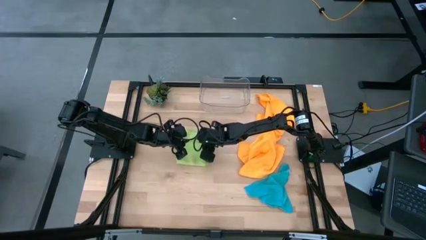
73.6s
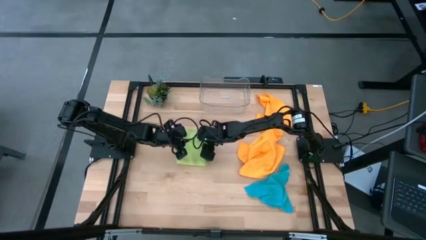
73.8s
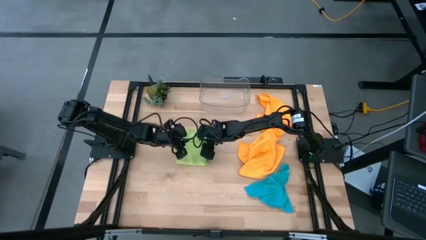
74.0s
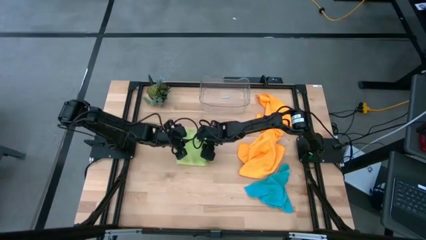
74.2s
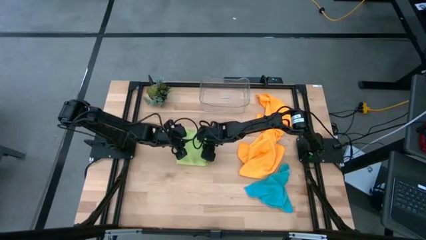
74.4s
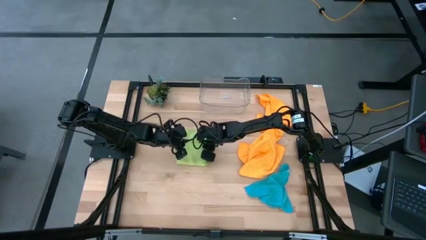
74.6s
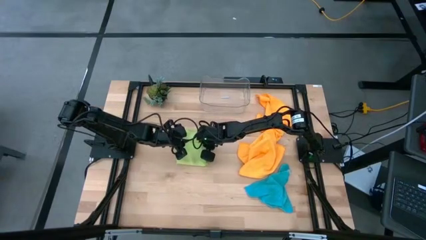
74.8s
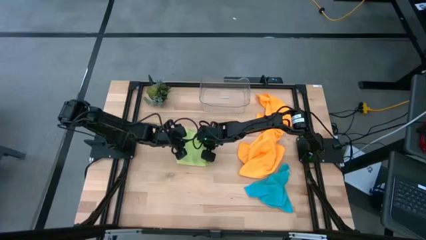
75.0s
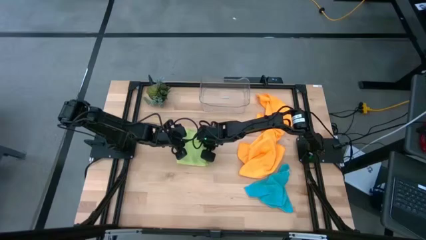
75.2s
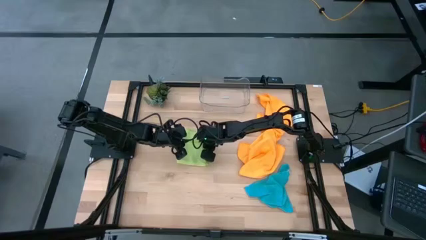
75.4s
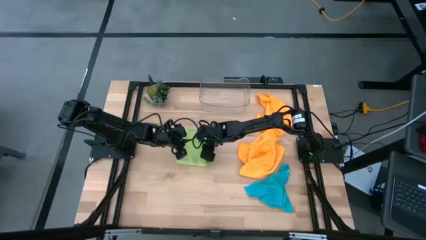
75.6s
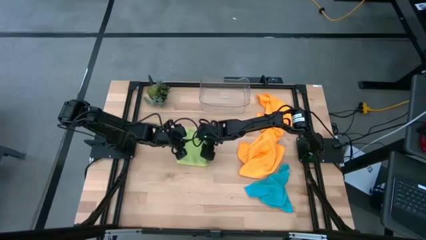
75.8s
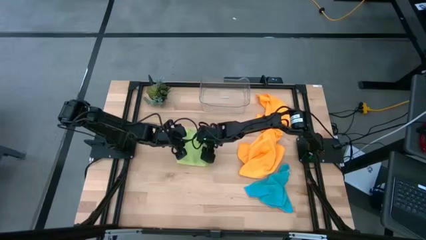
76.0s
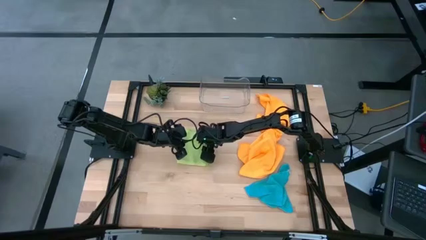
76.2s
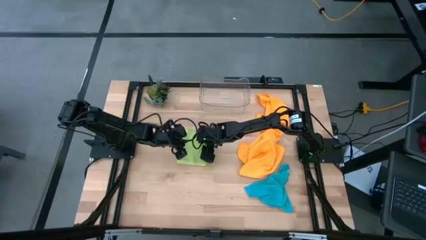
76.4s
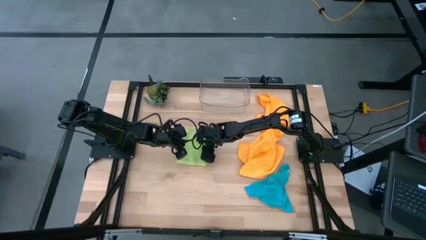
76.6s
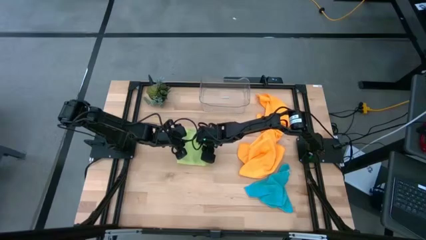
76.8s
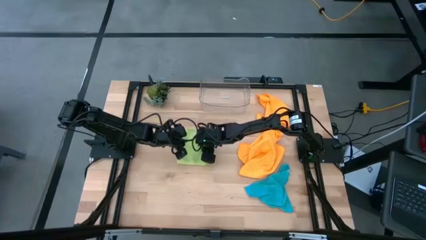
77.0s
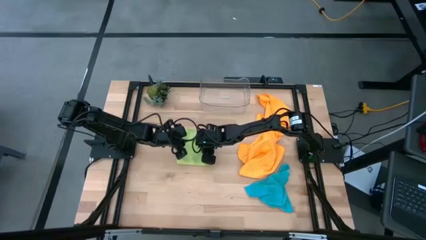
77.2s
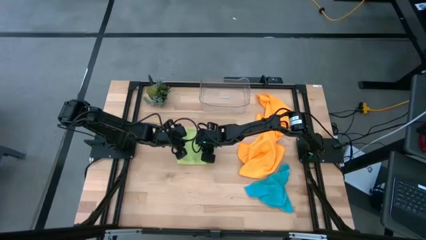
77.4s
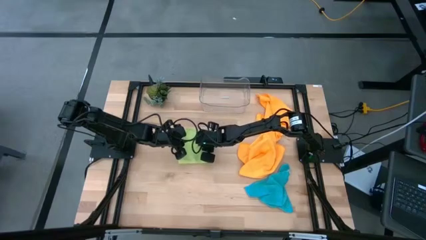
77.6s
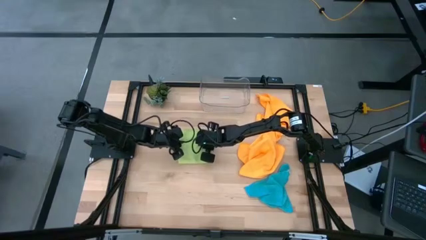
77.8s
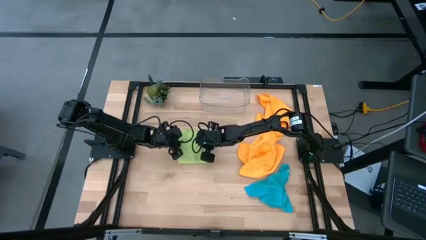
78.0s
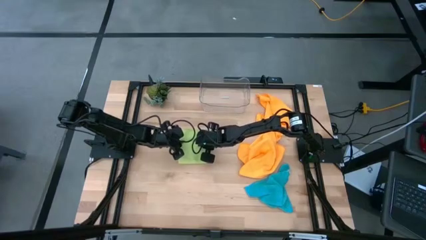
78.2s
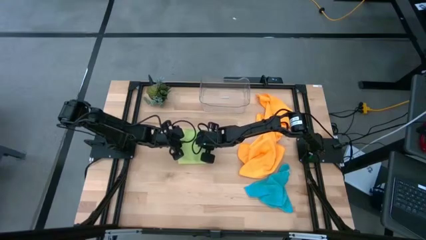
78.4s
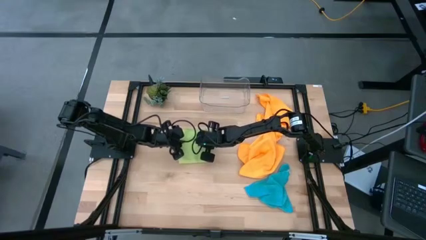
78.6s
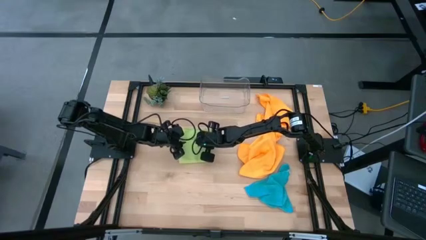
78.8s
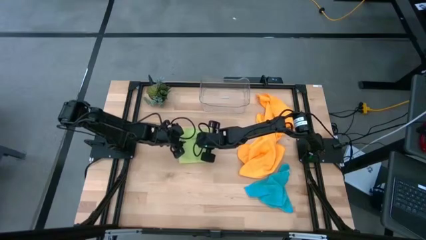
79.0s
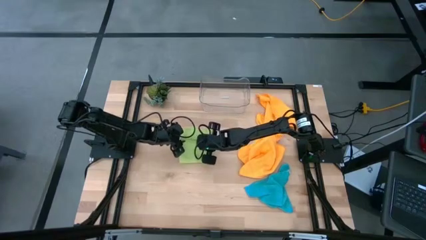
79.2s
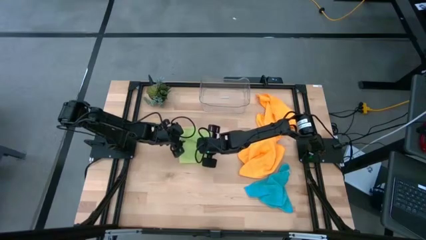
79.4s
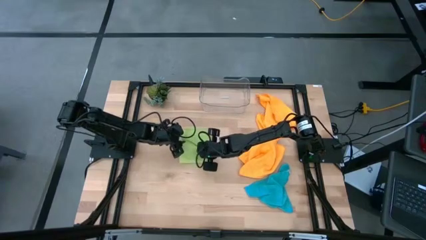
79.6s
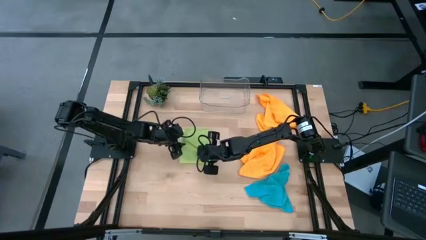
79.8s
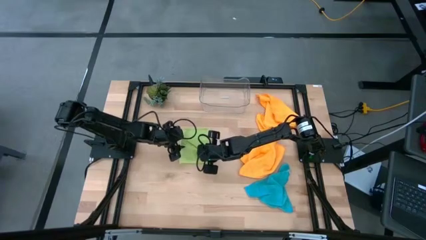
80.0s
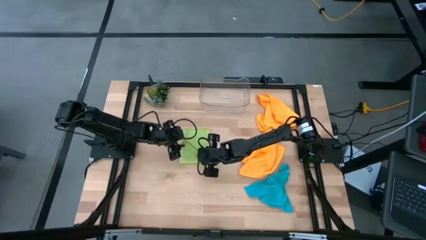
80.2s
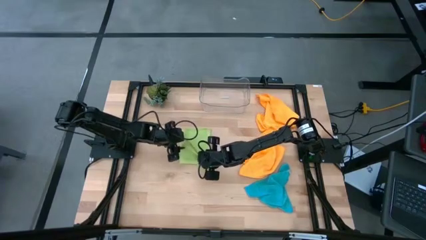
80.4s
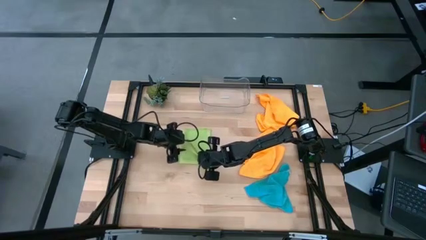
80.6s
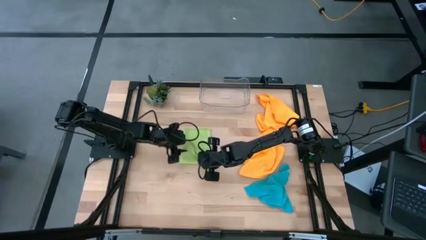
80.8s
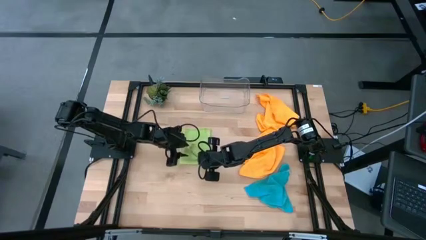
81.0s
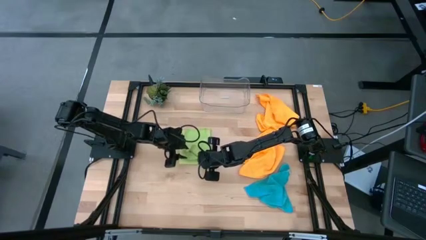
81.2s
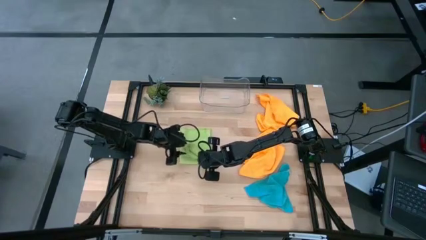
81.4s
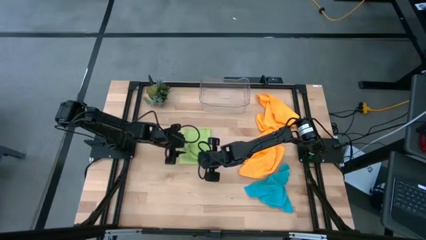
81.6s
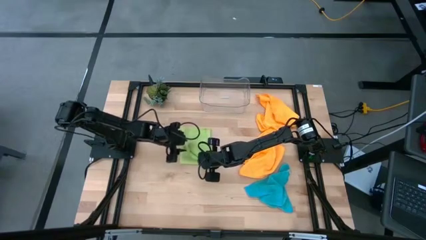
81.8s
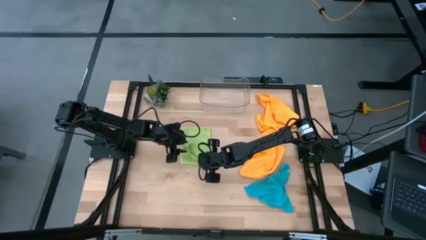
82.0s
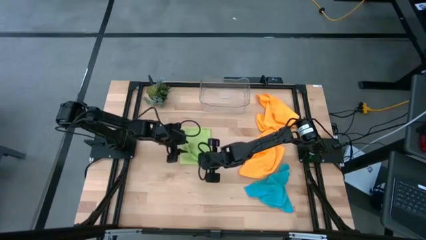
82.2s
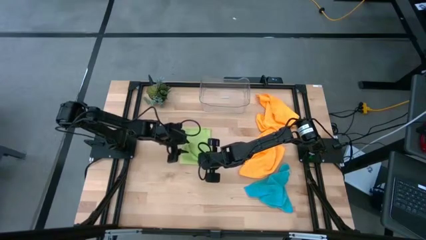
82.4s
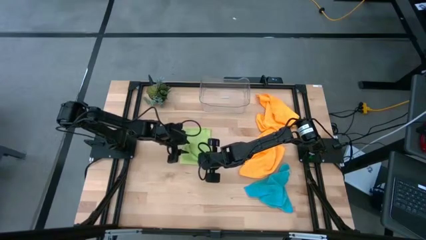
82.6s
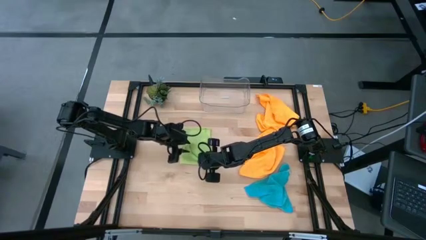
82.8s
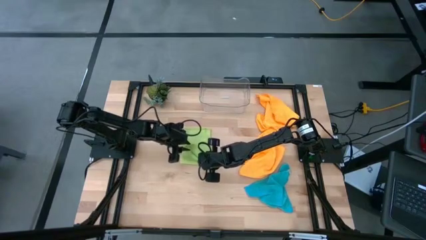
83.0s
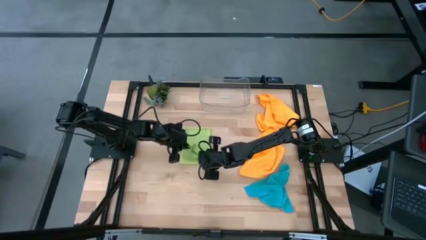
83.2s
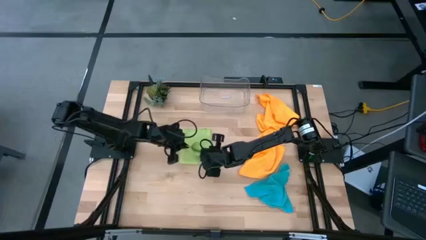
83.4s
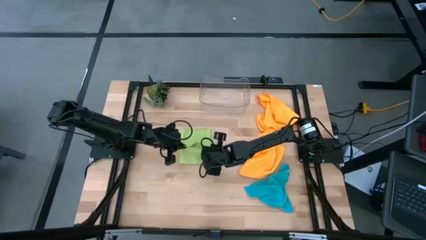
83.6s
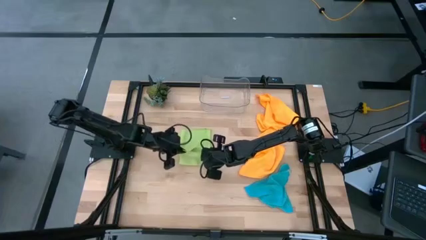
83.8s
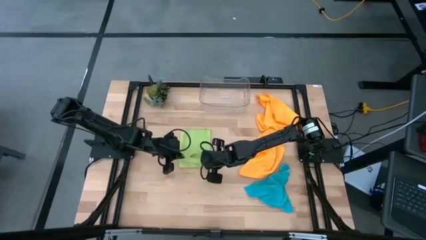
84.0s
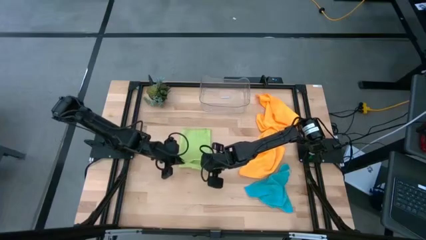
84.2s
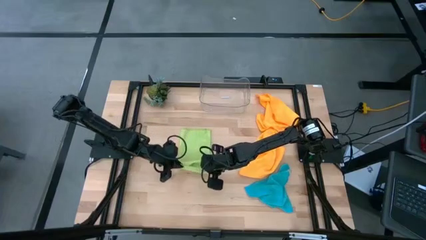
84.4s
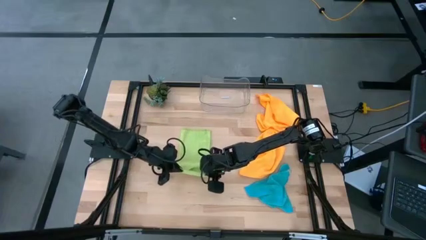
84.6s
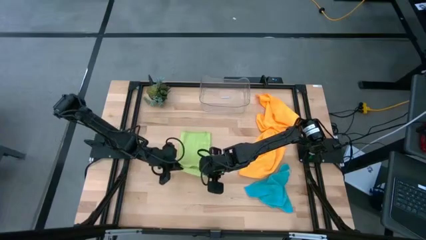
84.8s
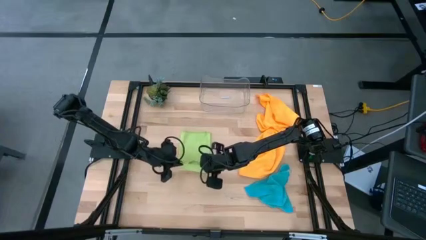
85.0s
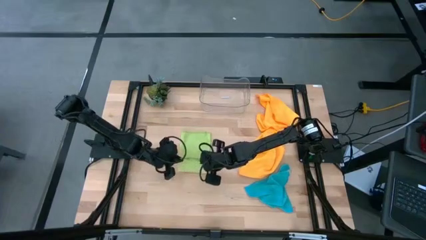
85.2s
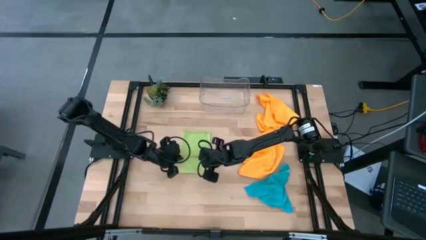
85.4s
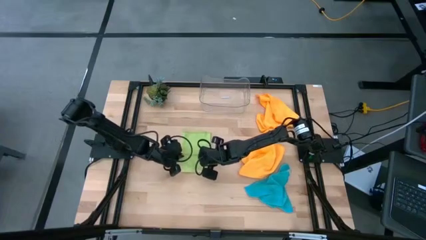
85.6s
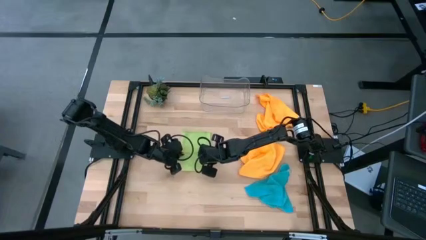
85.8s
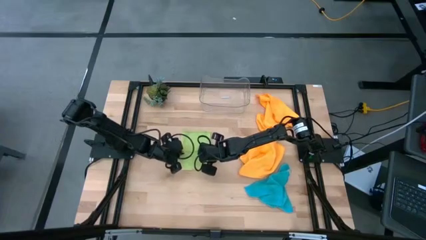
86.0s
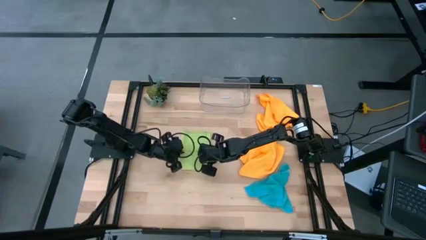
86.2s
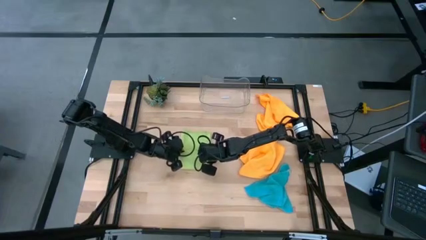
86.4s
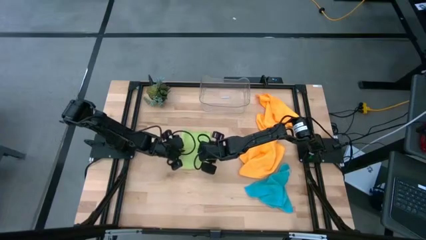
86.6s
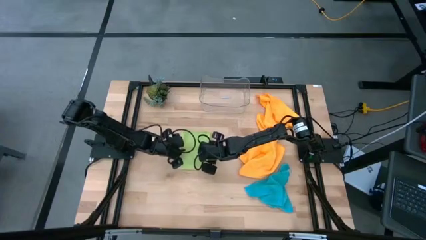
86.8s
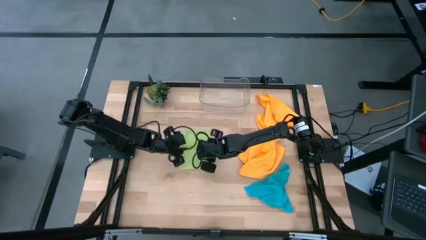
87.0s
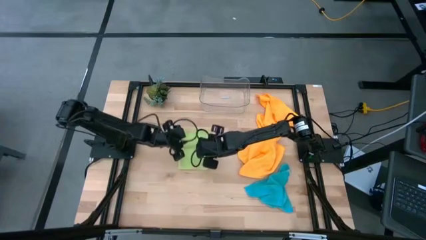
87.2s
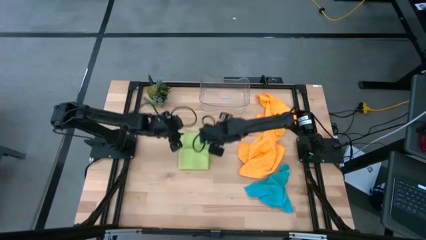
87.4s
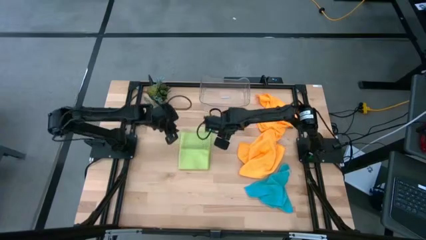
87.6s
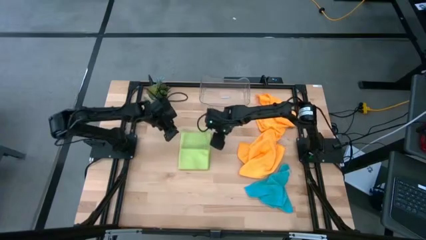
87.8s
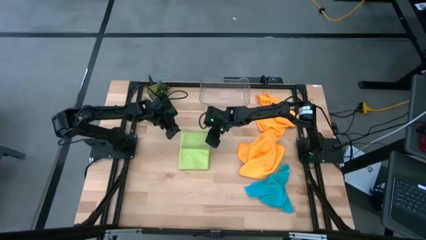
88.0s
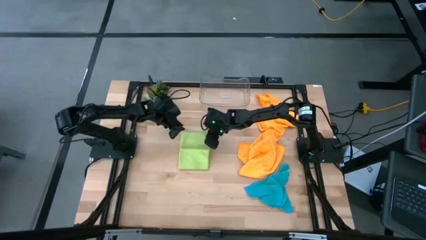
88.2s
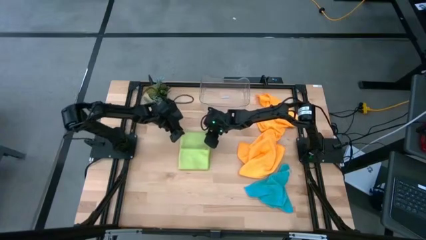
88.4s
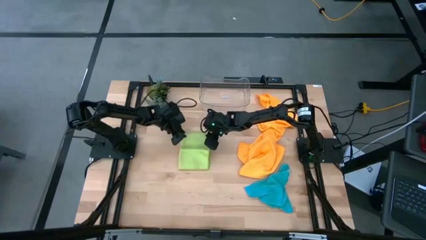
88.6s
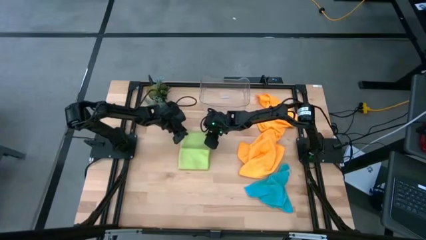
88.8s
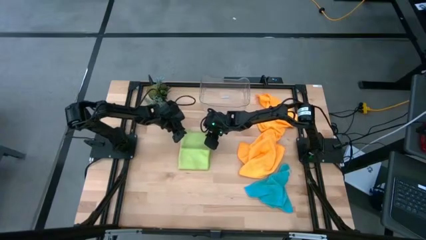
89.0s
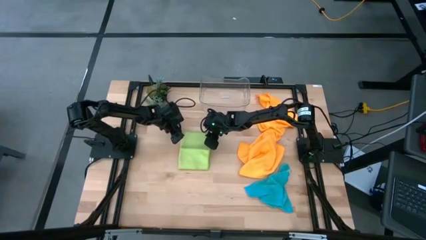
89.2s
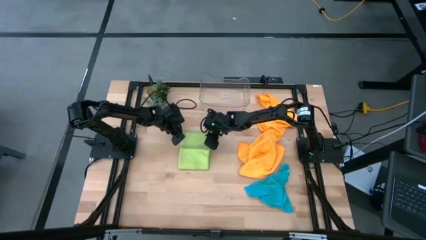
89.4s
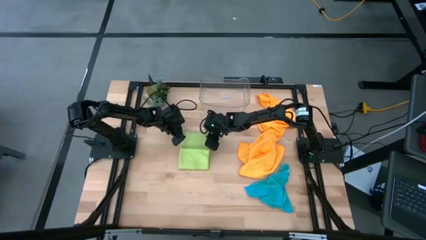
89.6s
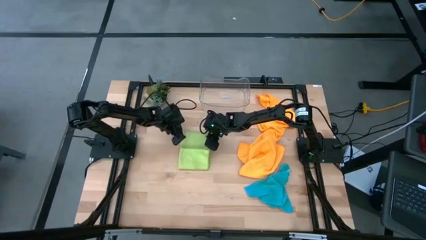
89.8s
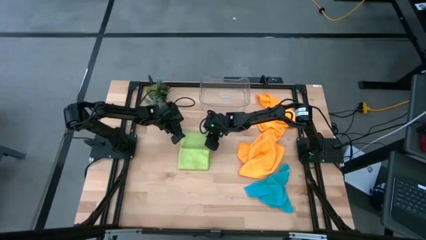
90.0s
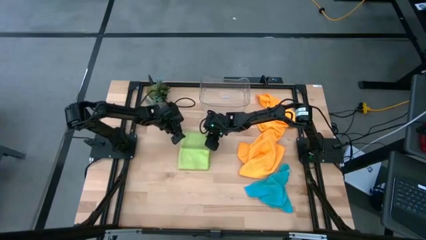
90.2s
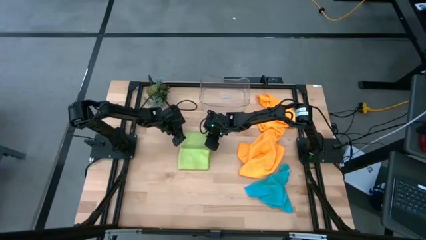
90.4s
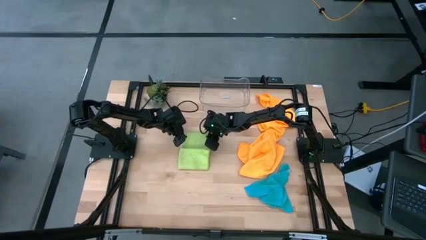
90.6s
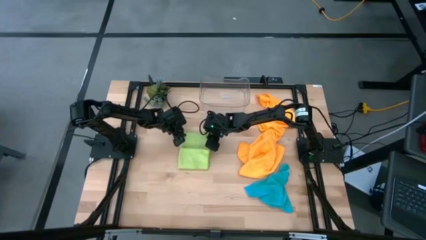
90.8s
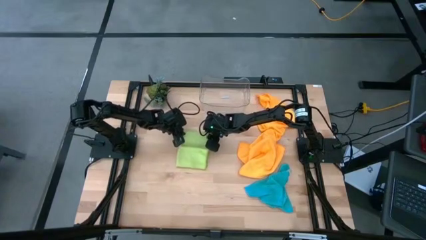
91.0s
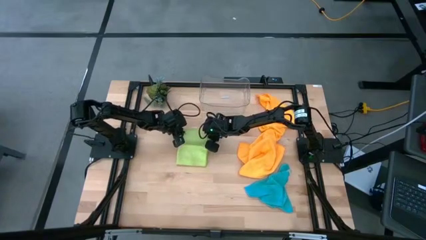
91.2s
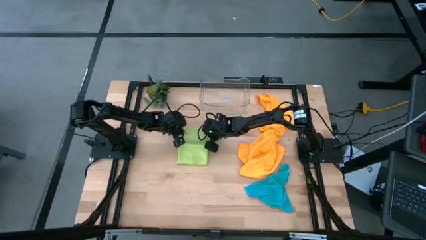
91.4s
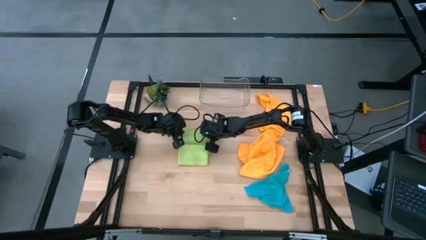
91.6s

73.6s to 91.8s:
Task: Fold microfiber towels
Fold the green microfiber cloth
